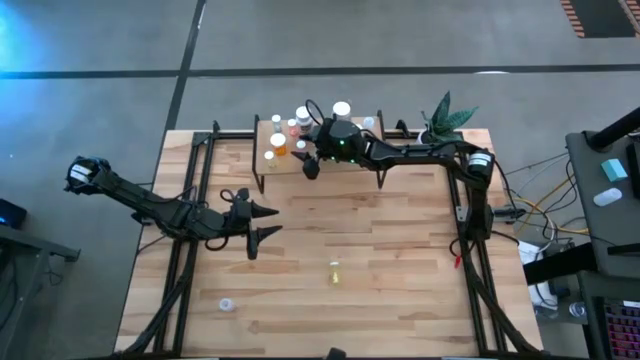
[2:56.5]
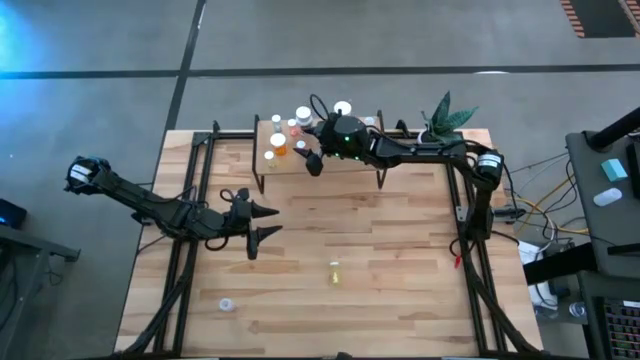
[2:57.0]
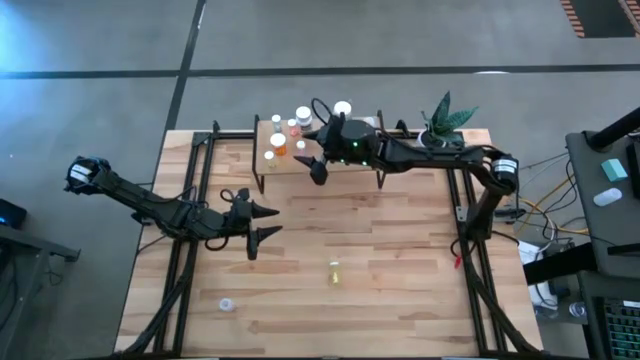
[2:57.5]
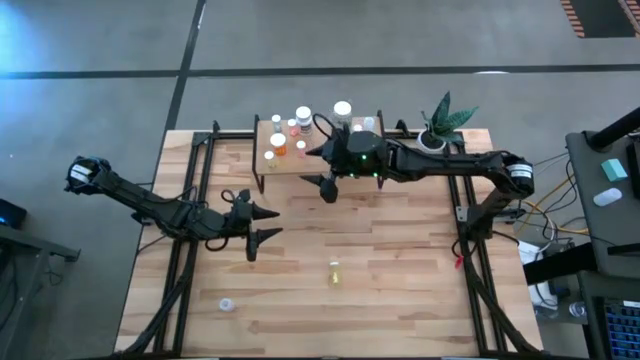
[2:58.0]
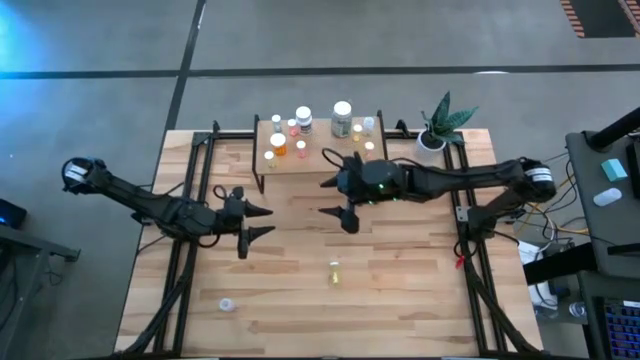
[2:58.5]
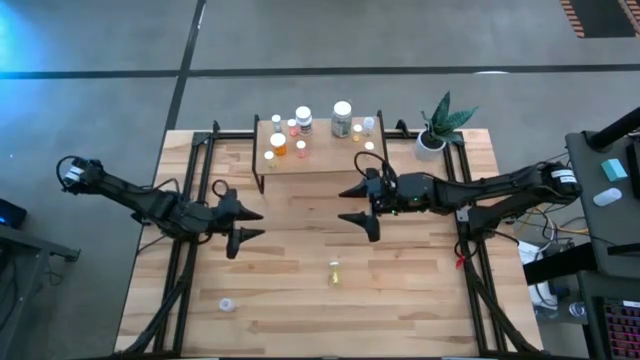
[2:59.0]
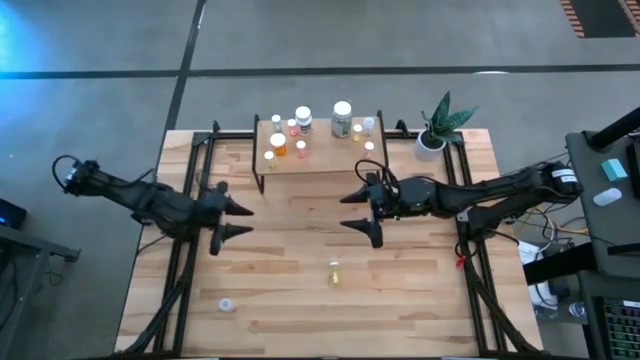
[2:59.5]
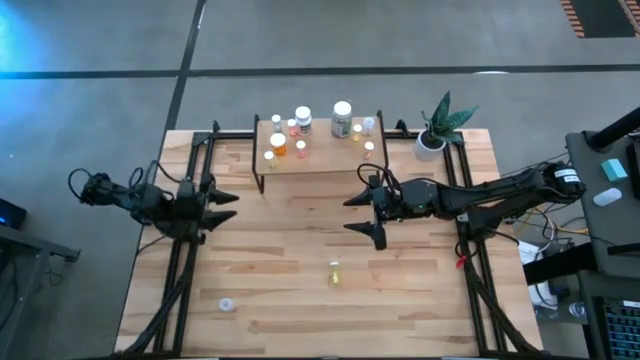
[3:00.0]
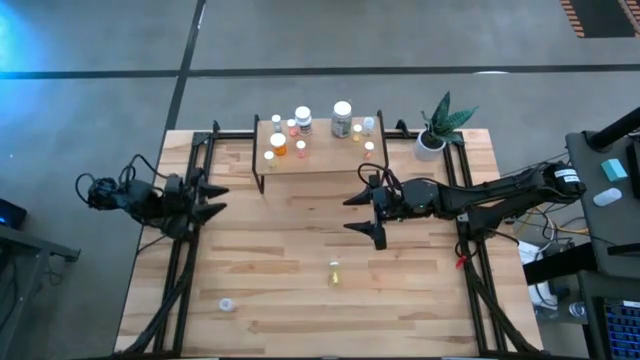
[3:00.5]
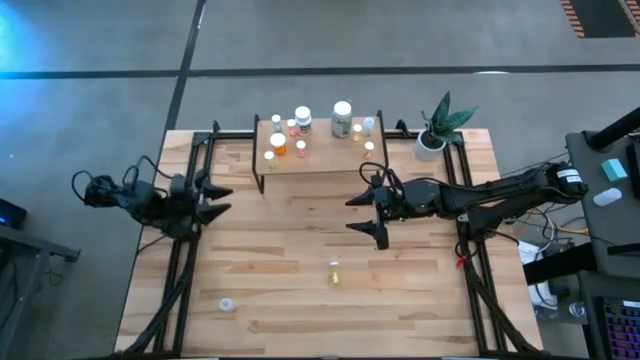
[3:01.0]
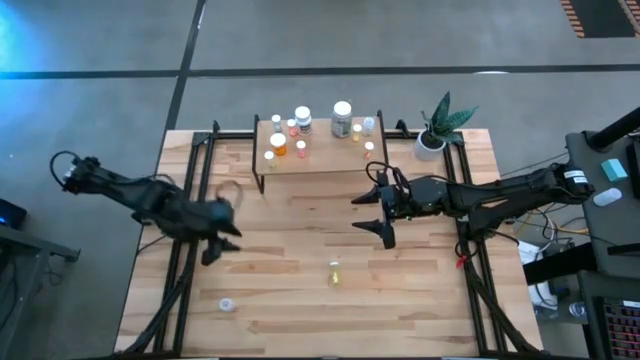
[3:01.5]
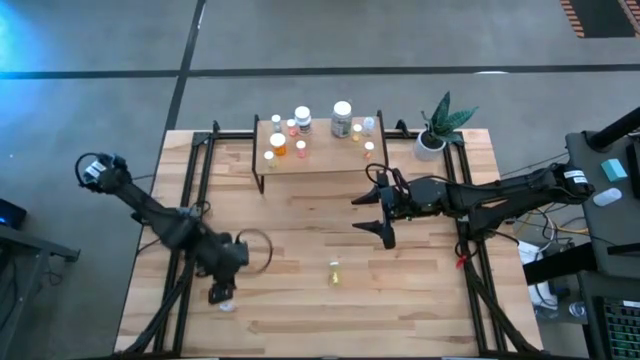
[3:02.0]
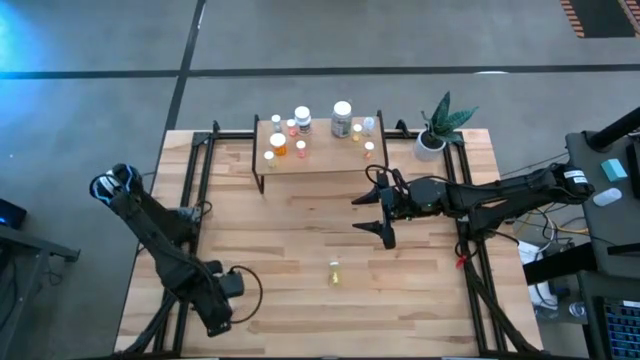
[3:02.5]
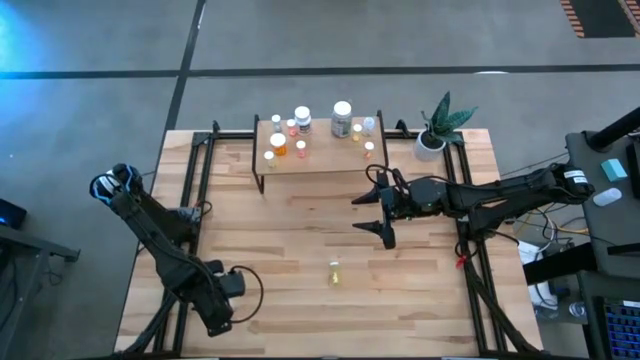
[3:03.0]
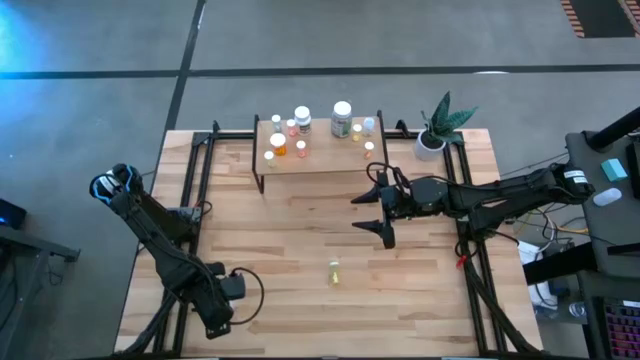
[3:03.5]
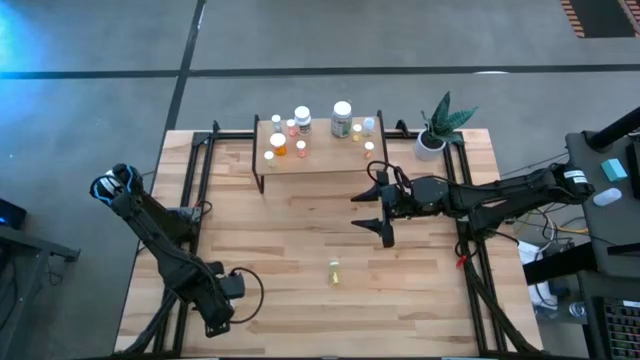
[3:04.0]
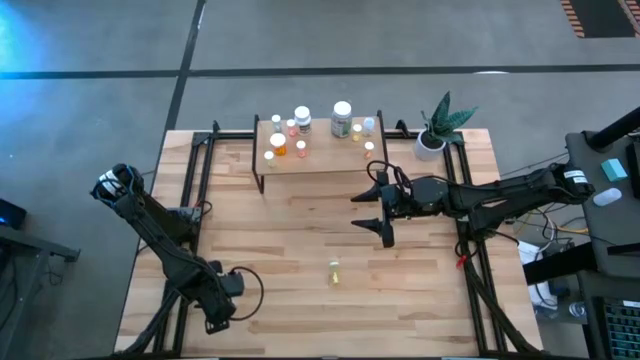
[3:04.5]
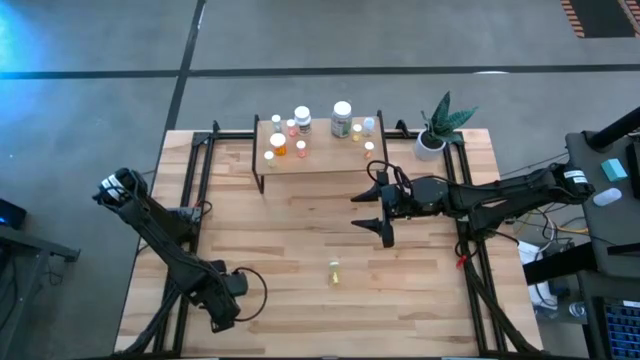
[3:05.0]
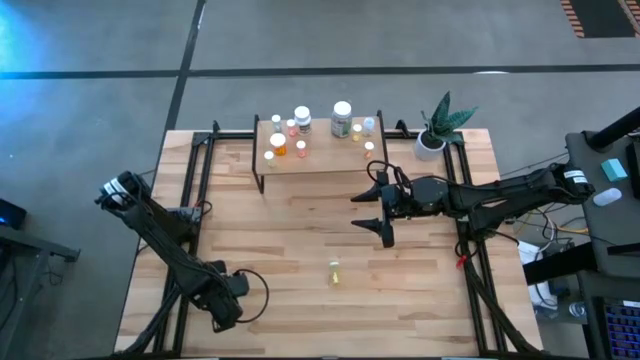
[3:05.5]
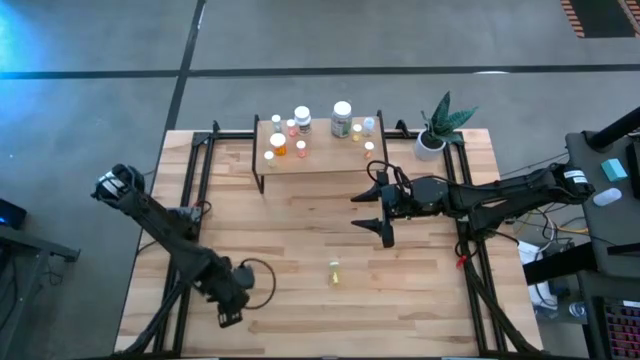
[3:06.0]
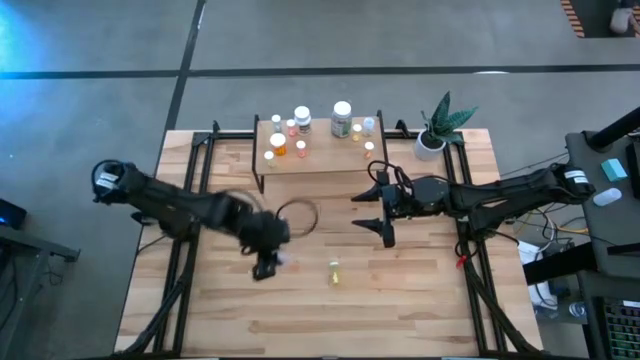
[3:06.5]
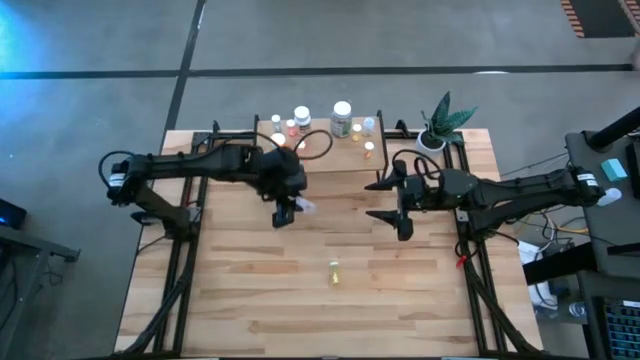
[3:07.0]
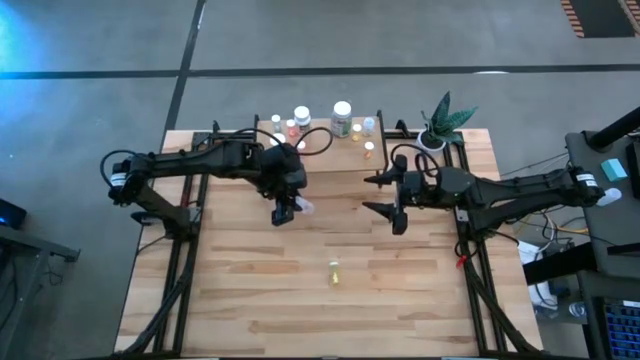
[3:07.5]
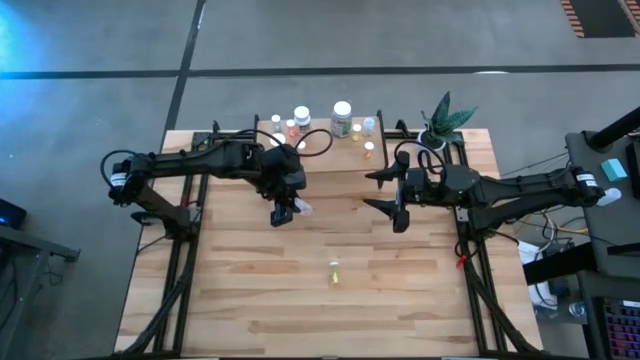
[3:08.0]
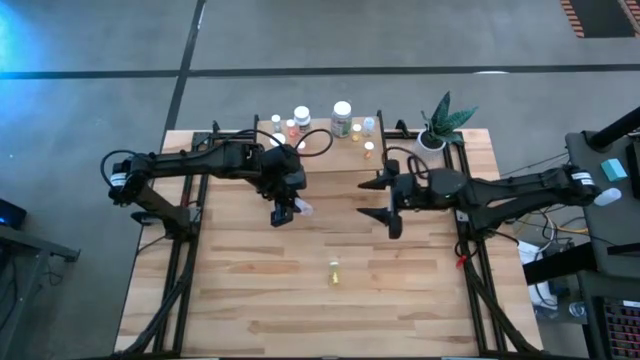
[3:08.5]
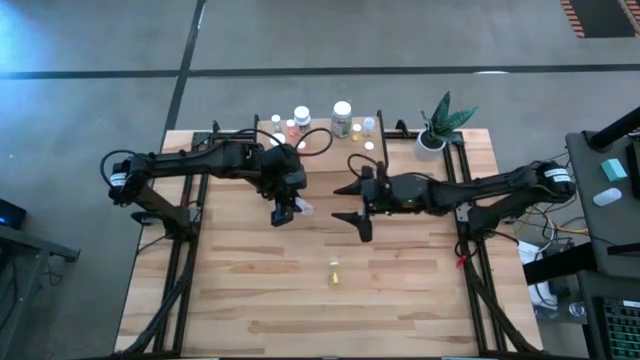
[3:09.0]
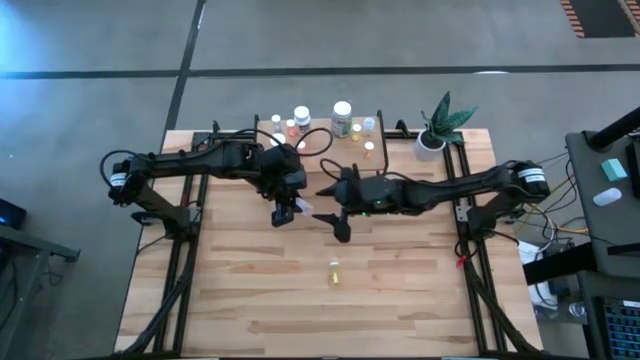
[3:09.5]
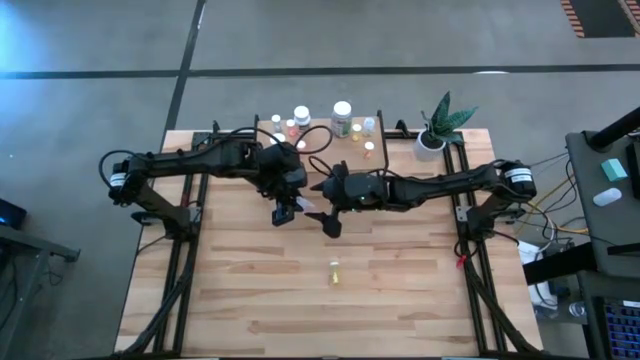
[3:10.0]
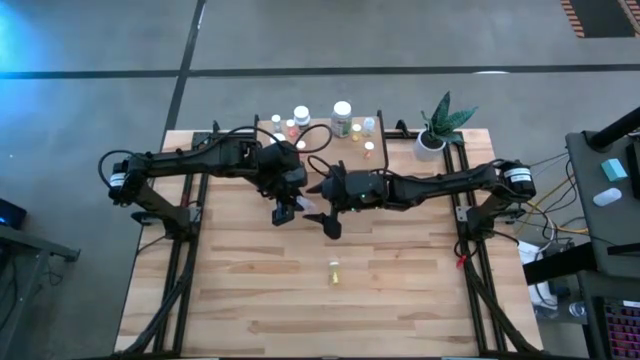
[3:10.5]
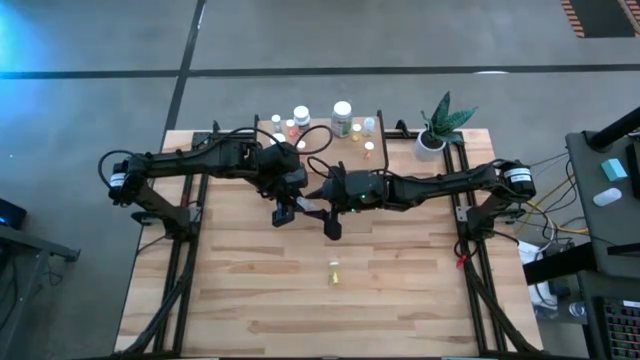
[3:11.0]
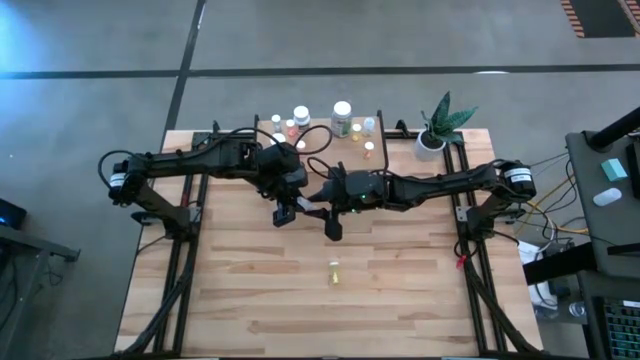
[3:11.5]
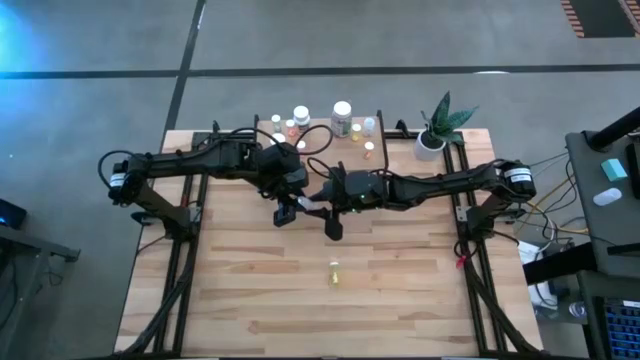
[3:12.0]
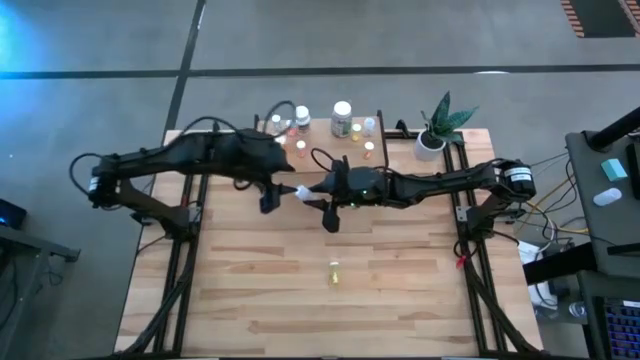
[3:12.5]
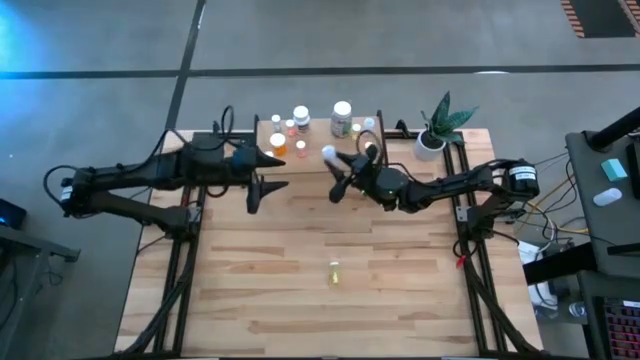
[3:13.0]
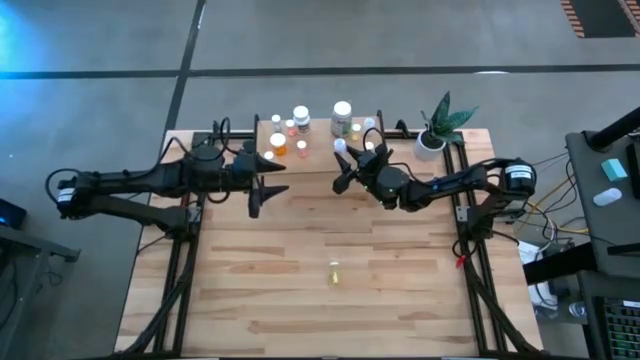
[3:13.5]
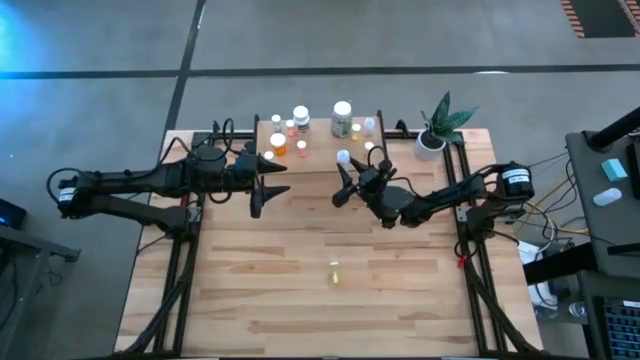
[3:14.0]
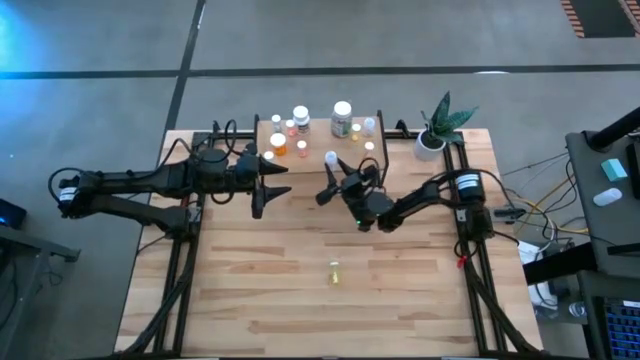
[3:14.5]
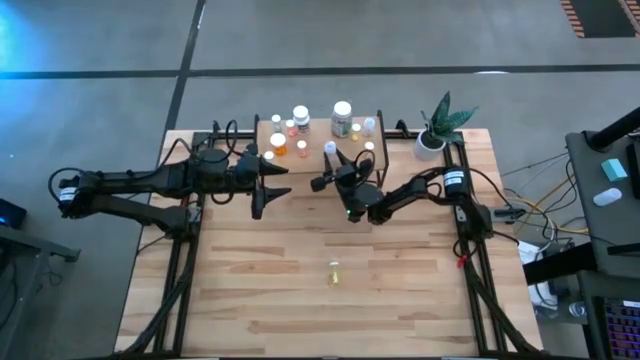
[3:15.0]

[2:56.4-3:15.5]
Task: Pick and place medicine bottles onto shelf by color
Put the blue medicine bottle on the shelf

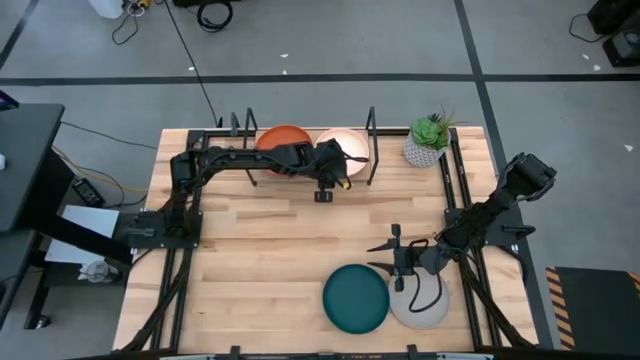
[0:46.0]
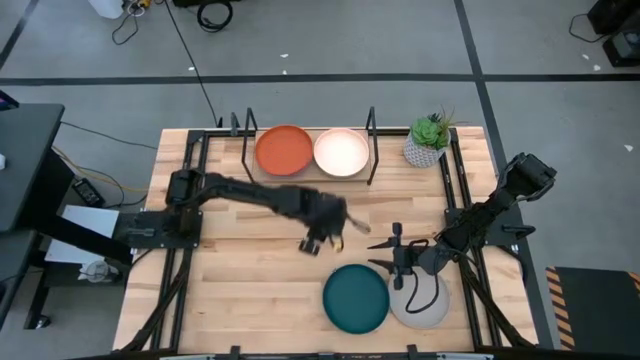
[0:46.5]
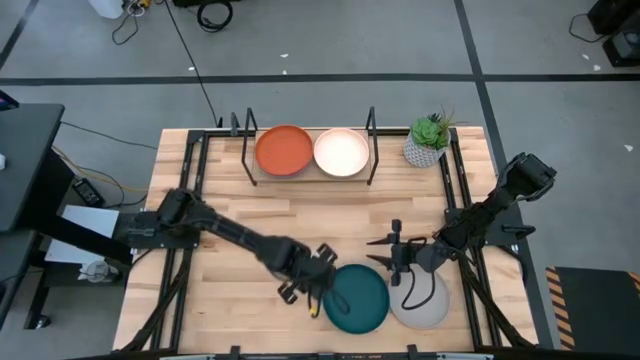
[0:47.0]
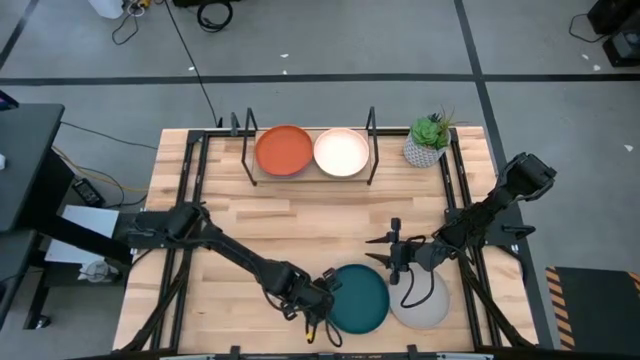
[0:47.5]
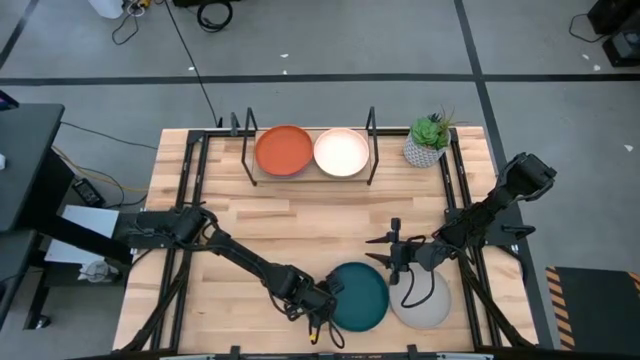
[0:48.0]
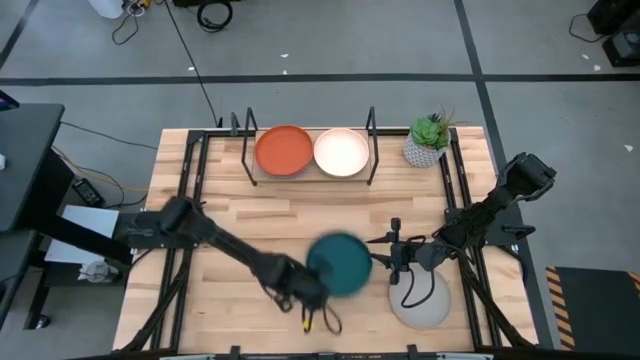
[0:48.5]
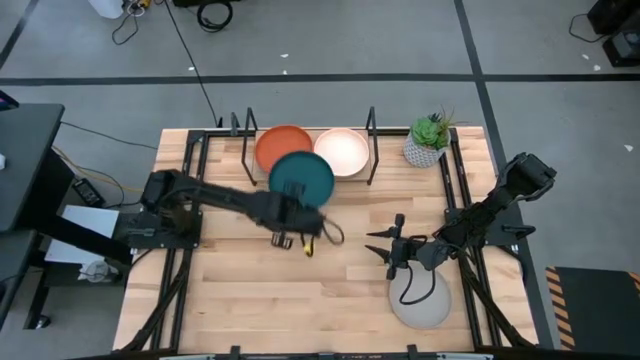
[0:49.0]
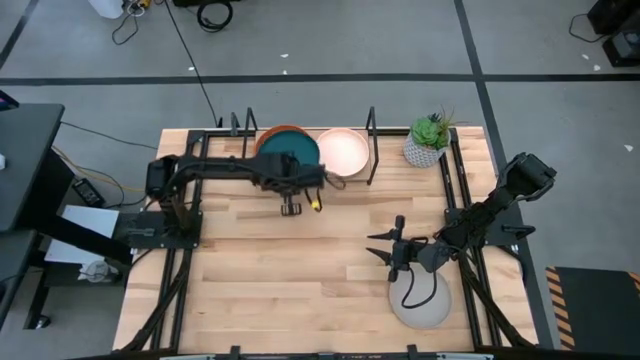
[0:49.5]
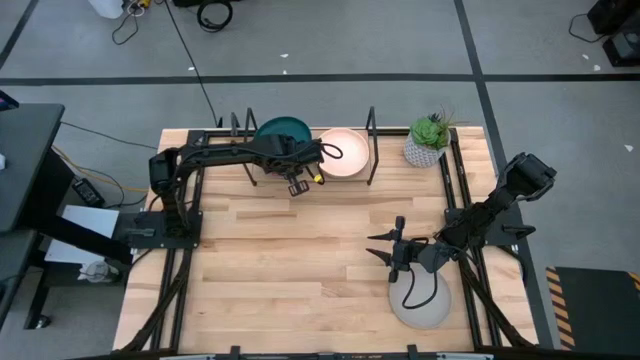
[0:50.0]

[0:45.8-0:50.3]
Task: Place and stack plates onto a shelf
Stack the green plate on top of the orange plate on the shelf
